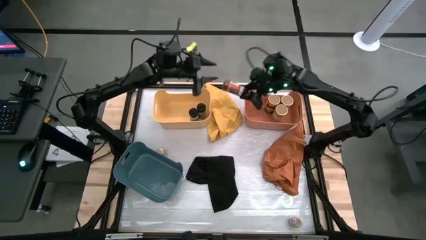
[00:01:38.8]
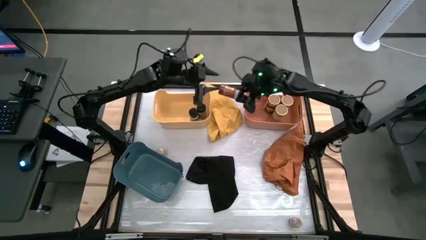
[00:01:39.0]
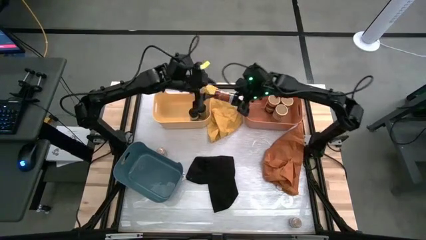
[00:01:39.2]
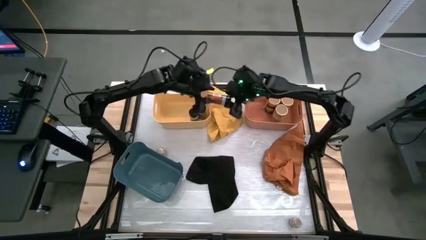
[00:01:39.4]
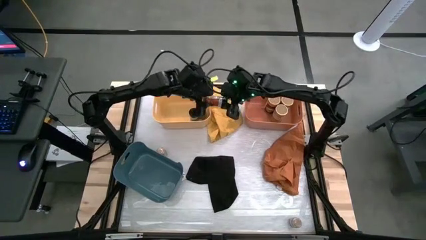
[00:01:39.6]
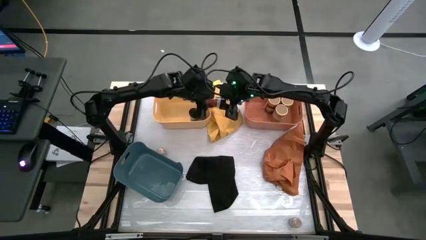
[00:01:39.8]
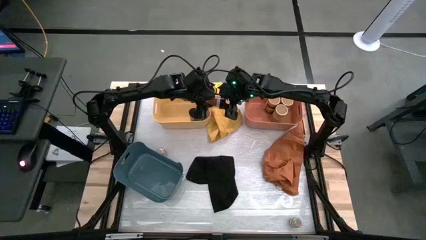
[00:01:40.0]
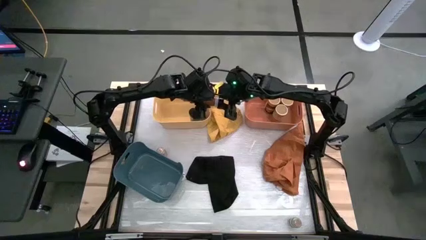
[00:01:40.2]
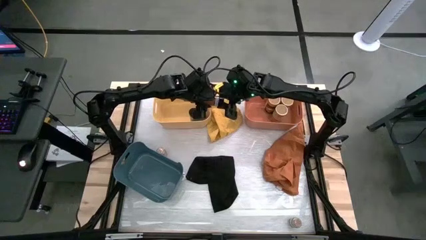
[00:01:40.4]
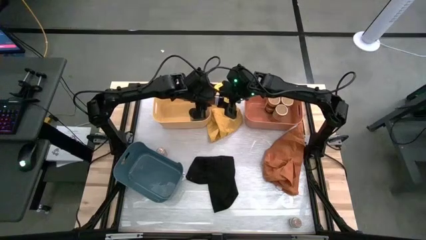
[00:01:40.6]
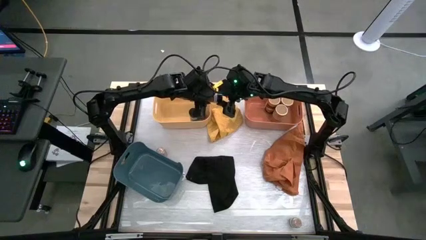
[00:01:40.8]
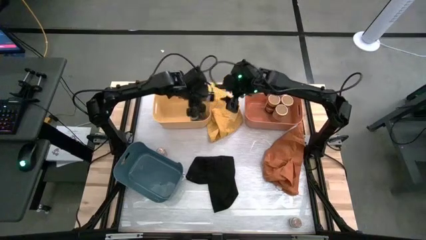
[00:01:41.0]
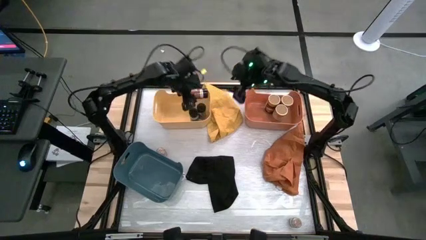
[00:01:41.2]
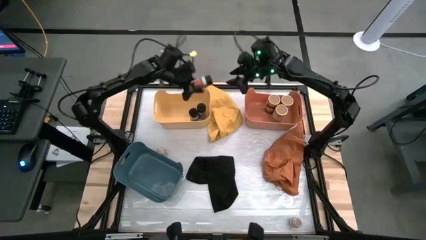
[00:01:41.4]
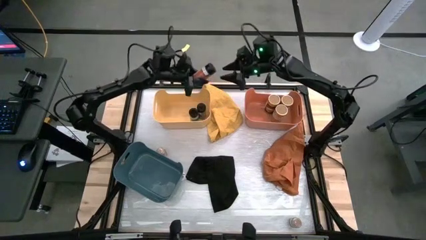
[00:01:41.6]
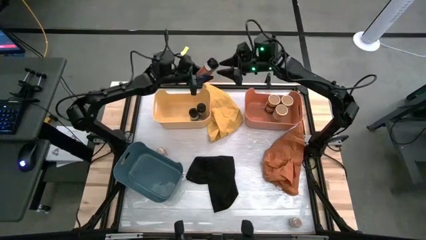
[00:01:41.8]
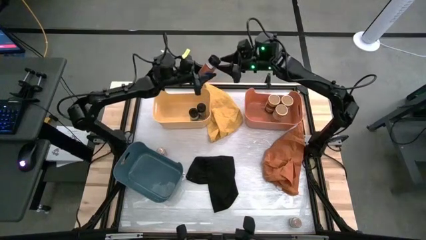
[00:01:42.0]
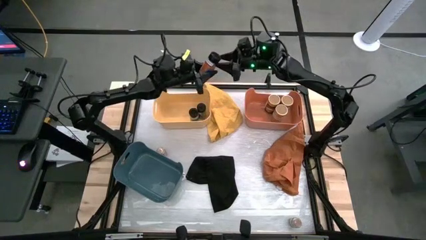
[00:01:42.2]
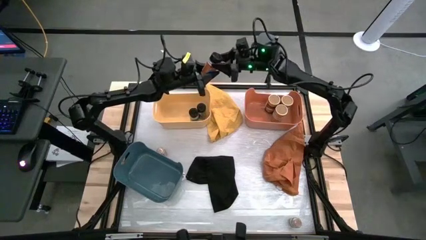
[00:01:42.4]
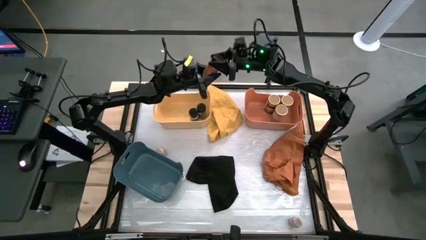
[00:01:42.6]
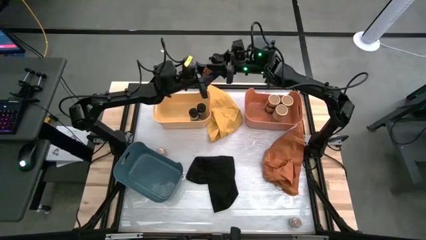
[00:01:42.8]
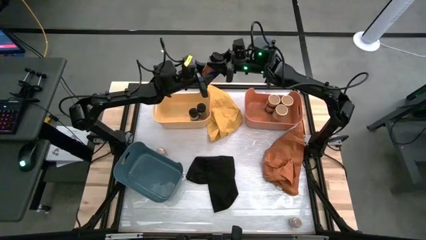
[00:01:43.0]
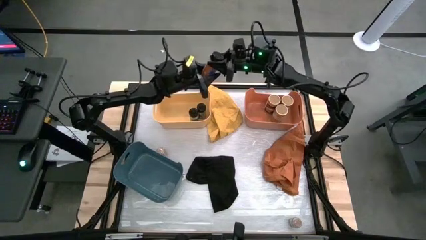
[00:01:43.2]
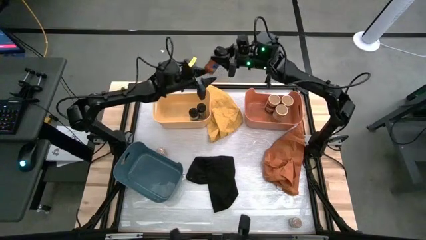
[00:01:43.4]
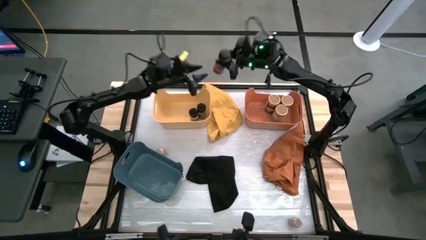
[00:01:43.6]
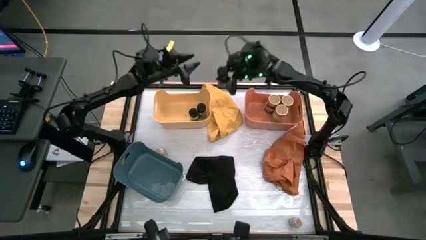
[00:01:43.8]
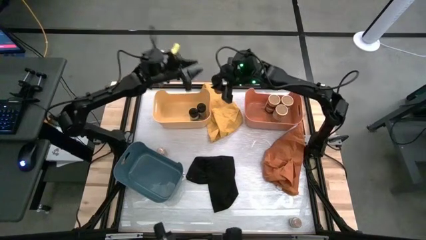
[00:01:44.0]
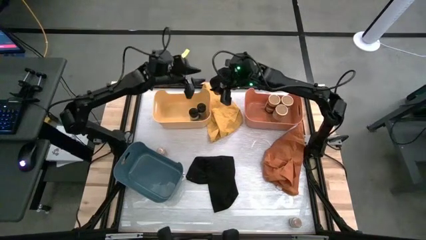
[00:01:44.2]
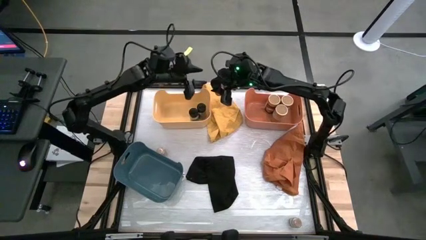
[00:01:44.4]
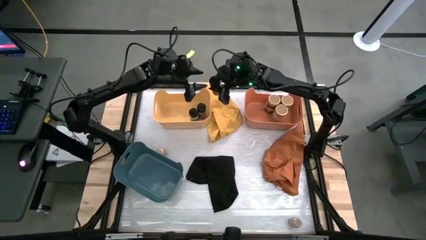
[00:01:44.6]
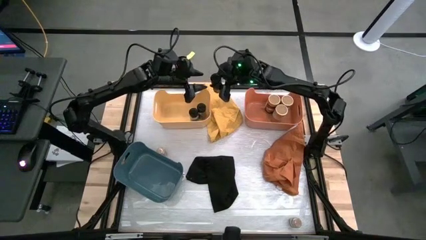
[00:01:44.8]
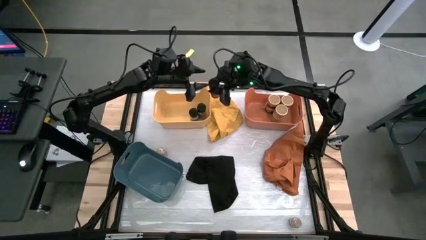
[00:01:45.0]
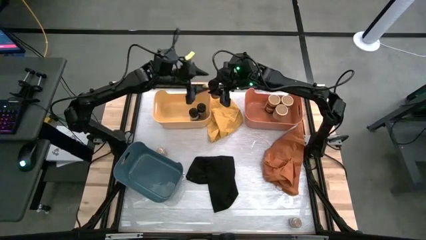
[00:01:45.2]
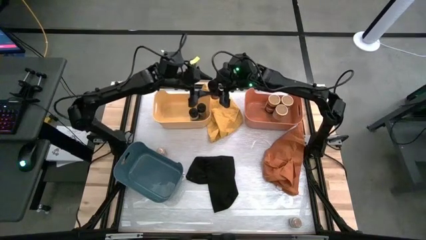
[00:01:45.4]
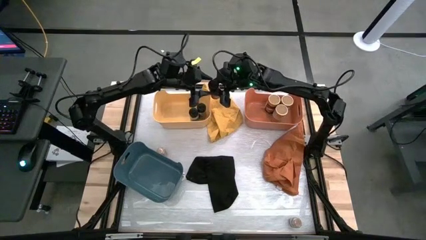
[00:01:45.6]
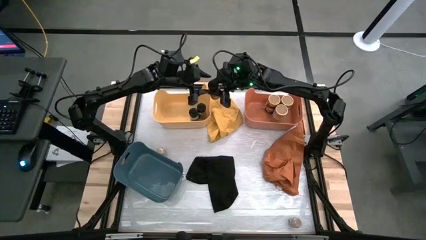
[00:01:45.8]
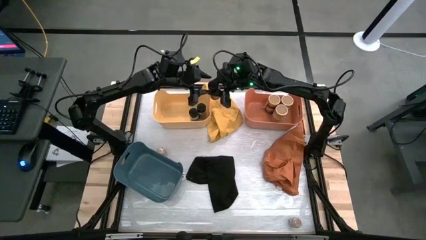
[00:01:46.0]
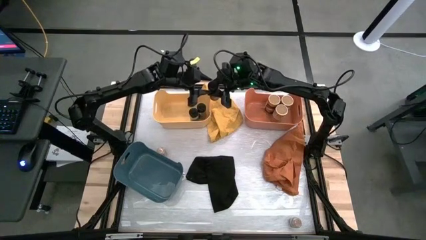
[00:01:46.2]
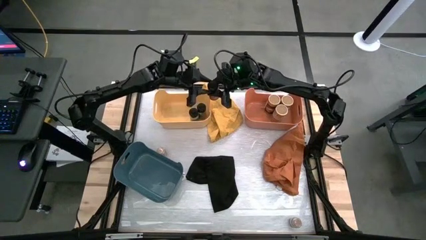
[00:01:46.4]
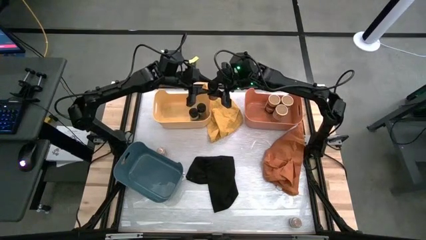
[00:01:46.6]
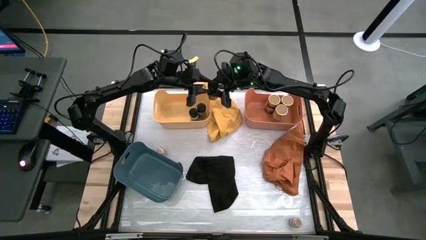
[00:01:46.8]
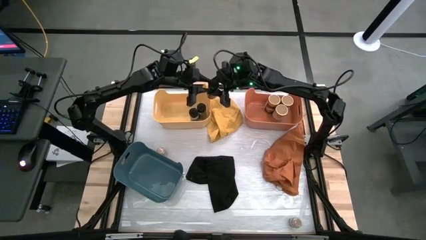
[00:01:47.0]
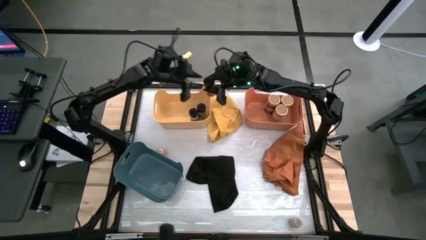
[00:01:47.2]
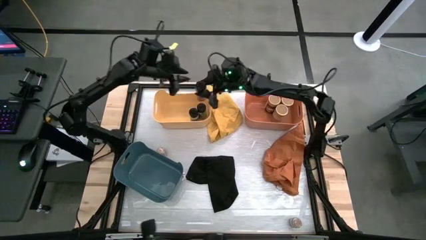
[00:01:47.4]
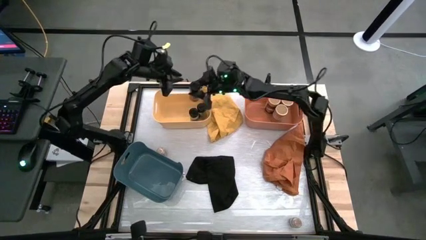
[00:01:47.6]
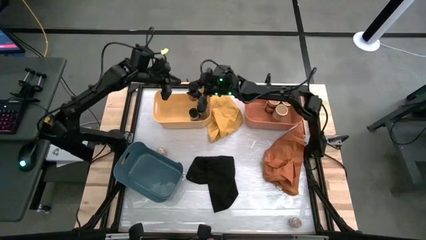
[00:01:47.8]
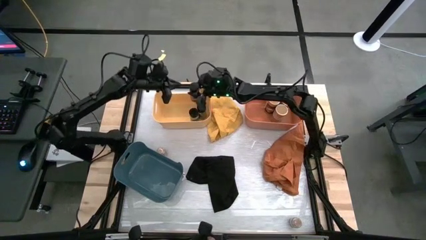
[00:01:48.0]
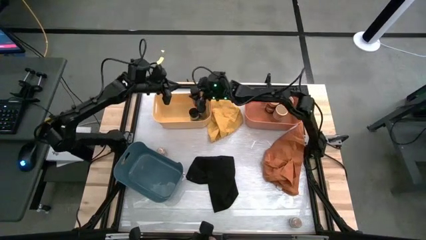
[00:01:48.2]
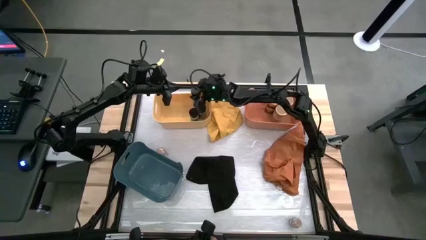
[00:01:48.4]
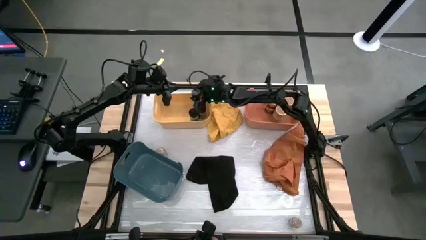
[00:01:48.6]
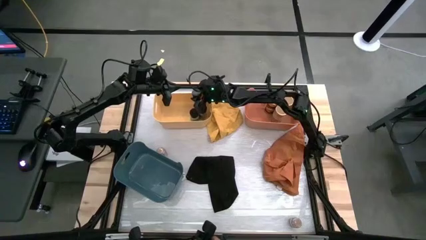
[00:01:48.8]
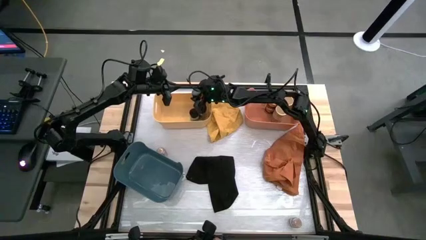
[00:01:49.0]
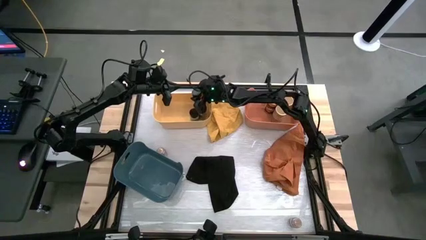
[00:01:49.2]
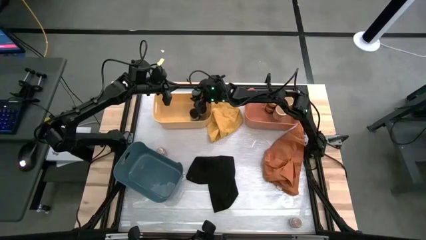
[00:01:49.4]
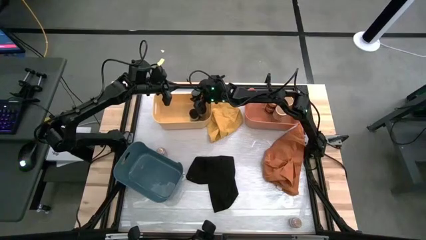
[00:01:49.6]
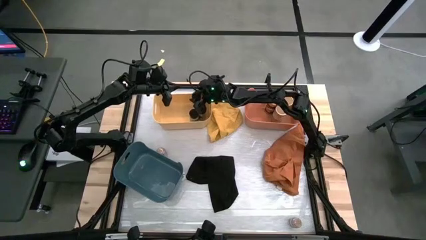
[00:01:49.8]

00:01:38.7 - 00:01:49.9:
Task: Sort spices by type
Put the black spice bottle into the yellow bin

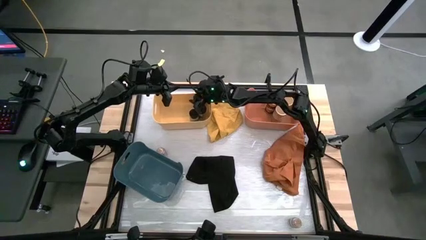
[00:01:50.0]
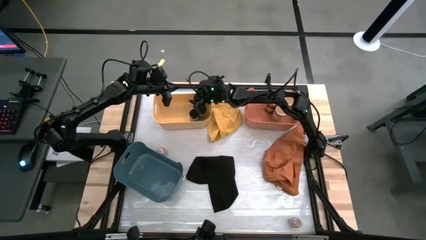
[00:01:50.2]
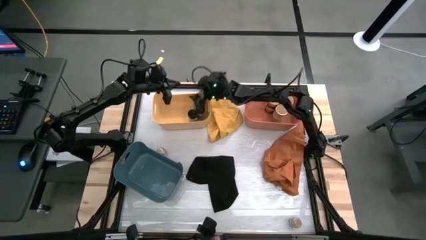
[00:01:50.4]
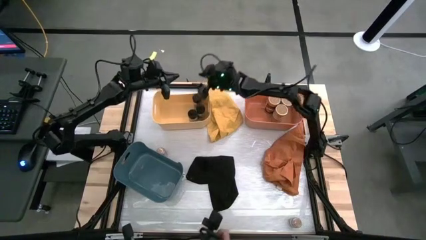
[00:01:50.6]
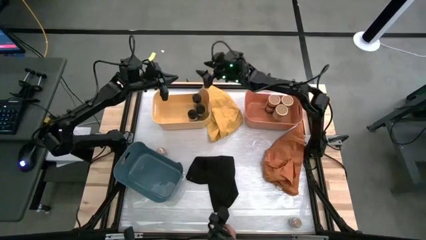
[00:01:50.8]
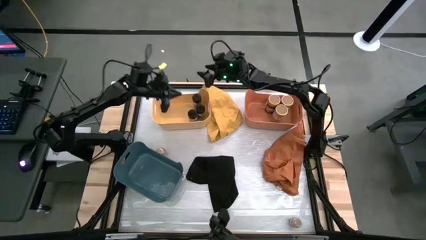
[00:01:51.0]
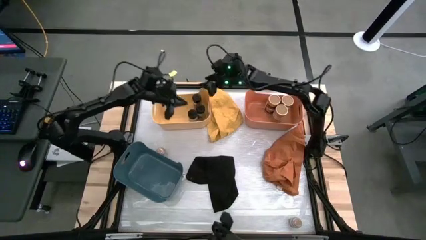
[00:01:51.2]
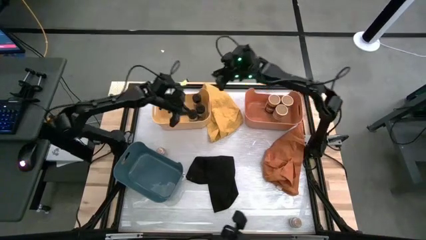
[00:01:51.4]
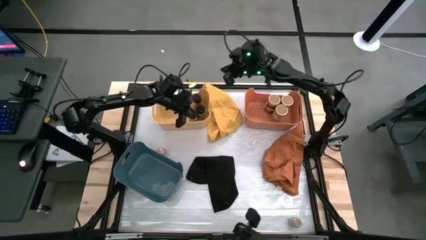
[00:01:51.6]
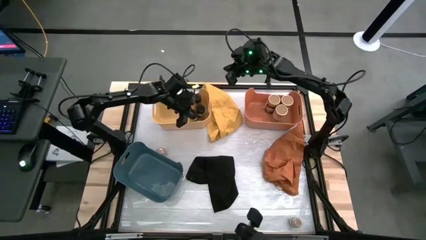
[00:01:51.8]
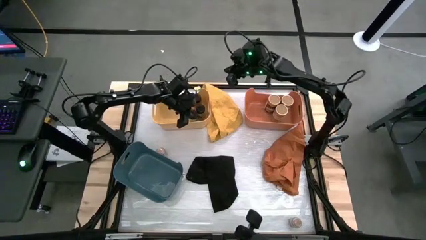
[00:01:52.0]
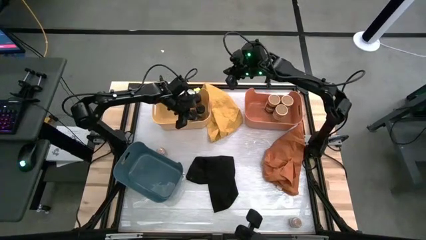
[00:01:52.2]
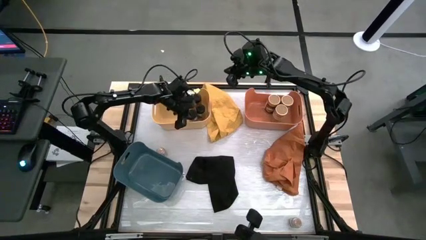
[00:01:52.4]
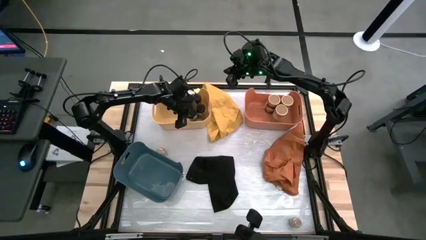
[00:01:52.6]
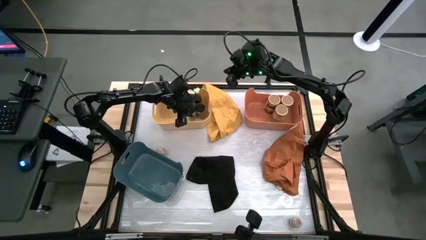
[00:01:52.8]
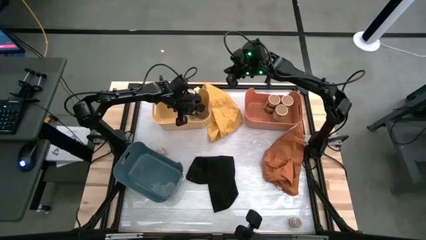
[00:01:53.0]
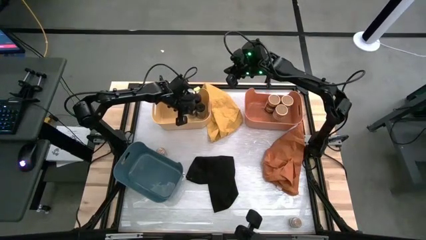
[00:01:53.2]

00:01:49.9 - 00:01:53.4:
Adjust the black spice bottle into the yellow bin
